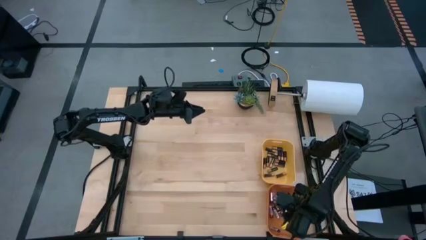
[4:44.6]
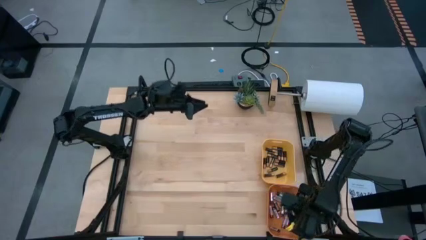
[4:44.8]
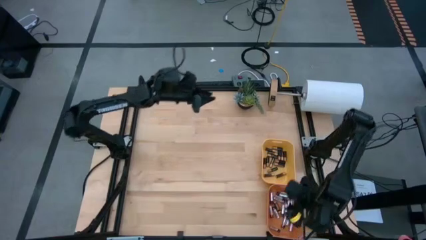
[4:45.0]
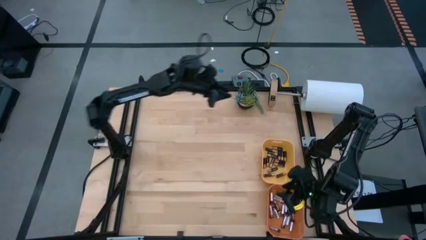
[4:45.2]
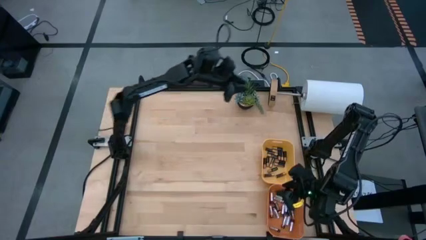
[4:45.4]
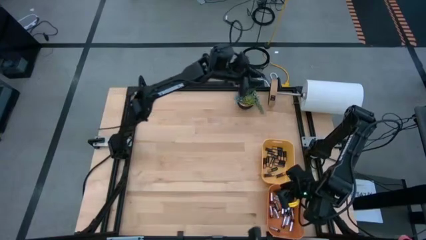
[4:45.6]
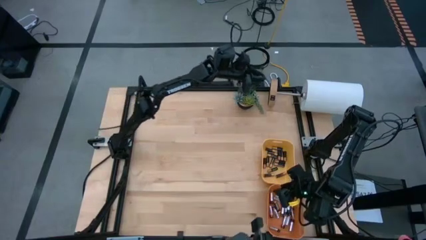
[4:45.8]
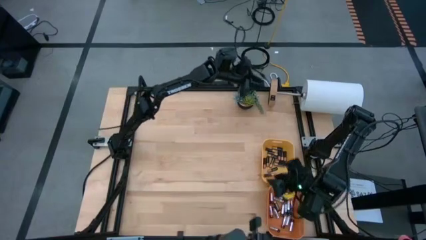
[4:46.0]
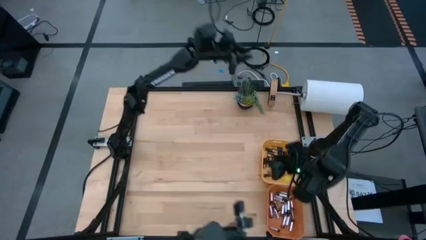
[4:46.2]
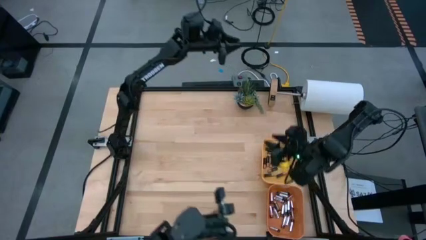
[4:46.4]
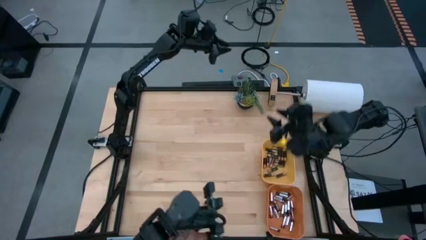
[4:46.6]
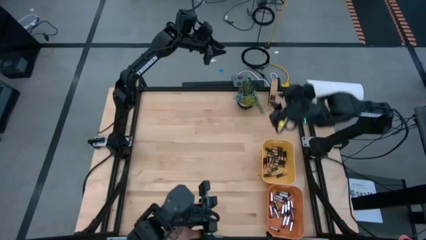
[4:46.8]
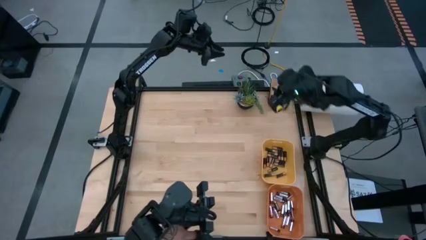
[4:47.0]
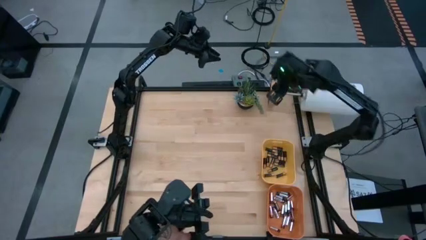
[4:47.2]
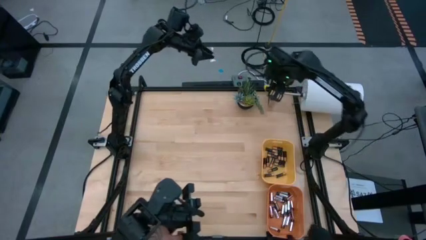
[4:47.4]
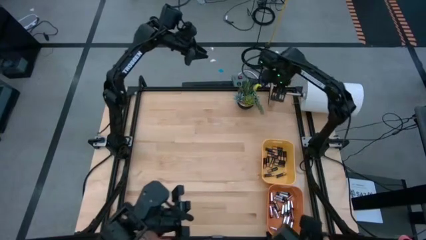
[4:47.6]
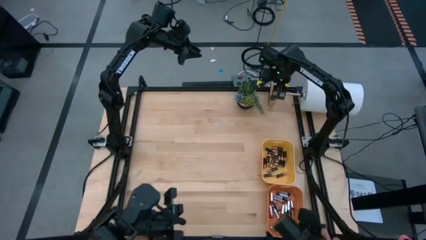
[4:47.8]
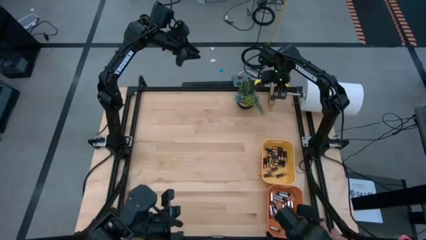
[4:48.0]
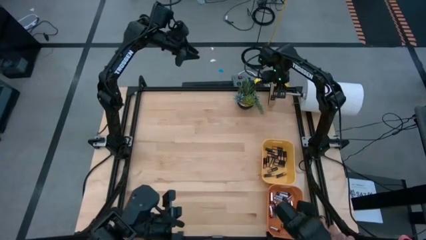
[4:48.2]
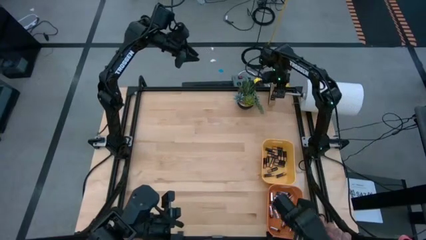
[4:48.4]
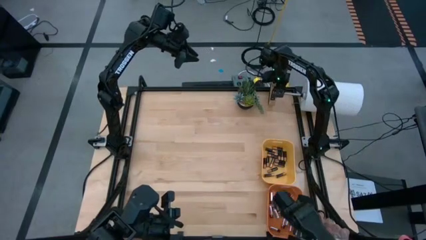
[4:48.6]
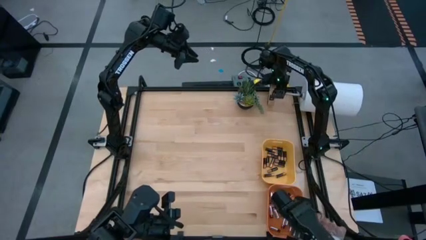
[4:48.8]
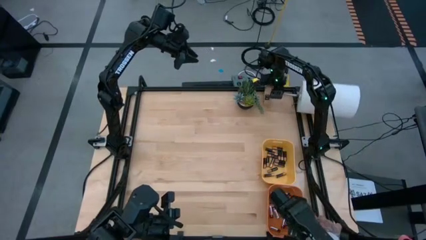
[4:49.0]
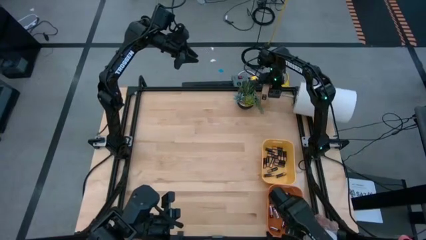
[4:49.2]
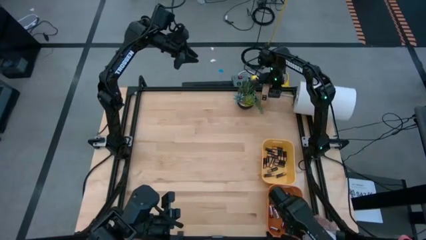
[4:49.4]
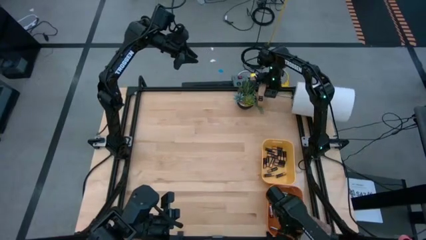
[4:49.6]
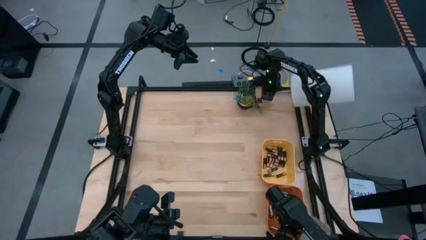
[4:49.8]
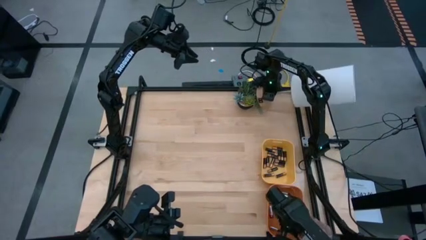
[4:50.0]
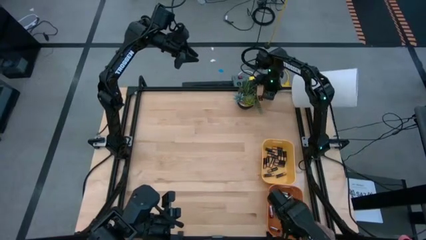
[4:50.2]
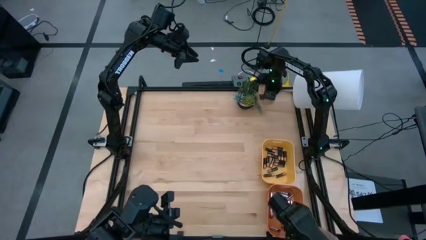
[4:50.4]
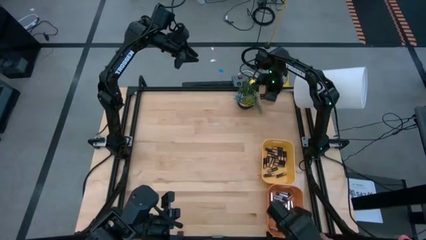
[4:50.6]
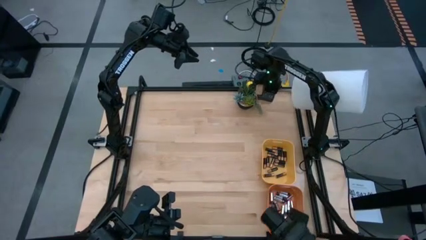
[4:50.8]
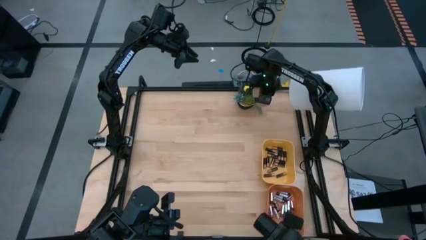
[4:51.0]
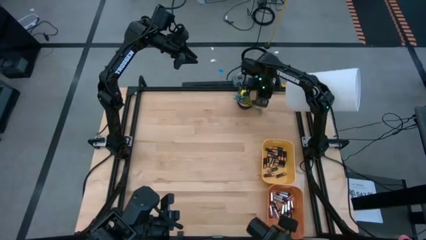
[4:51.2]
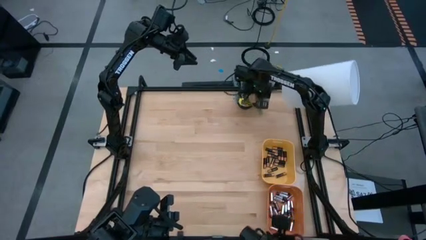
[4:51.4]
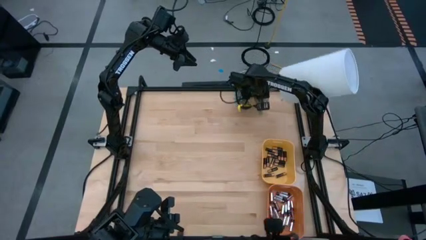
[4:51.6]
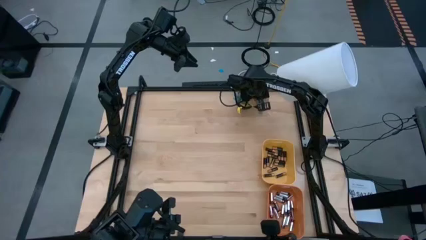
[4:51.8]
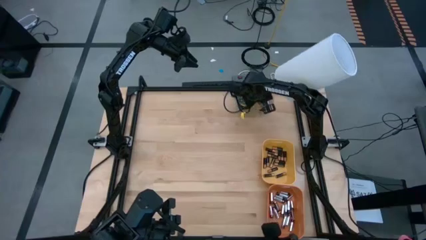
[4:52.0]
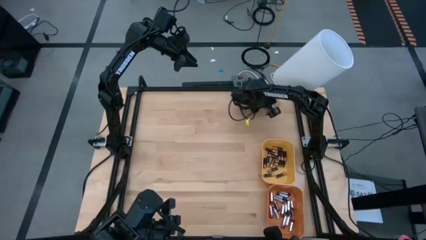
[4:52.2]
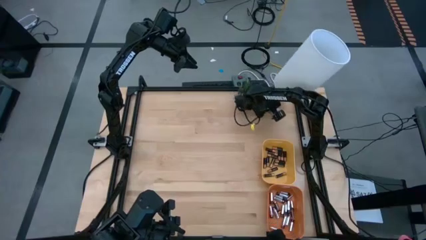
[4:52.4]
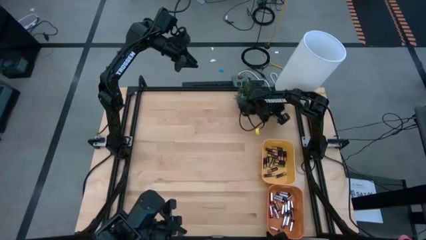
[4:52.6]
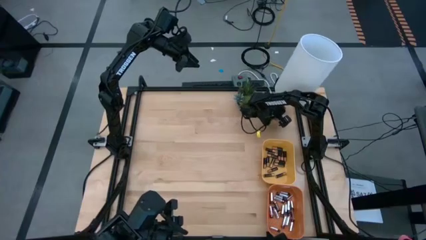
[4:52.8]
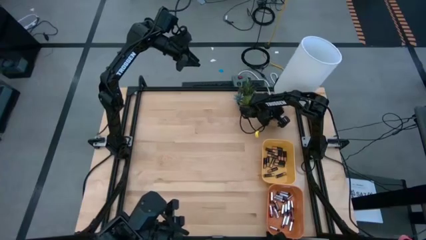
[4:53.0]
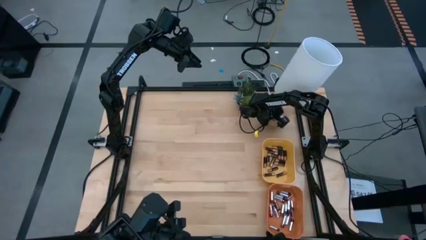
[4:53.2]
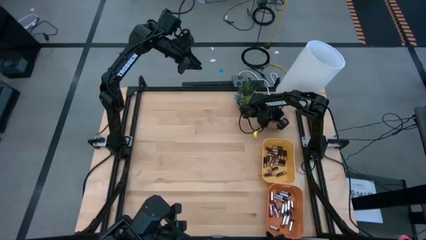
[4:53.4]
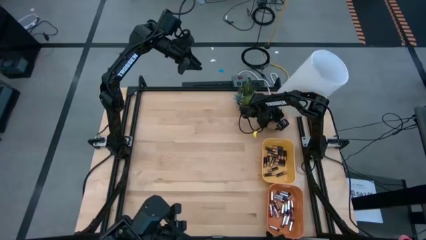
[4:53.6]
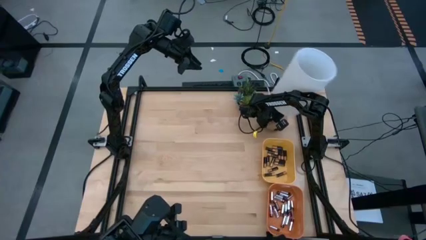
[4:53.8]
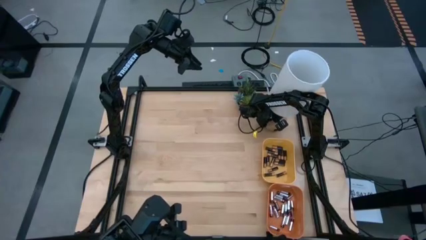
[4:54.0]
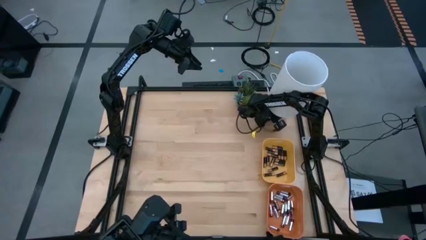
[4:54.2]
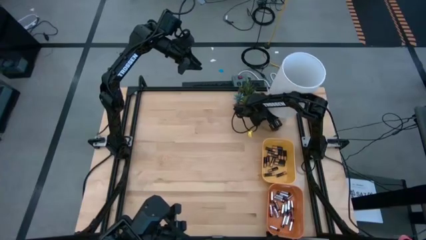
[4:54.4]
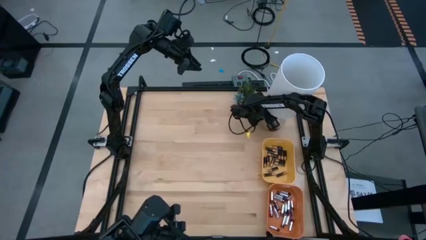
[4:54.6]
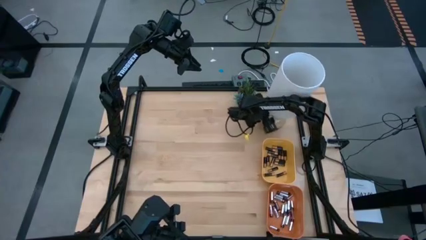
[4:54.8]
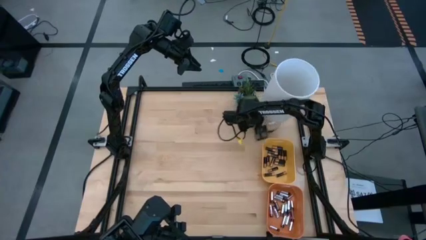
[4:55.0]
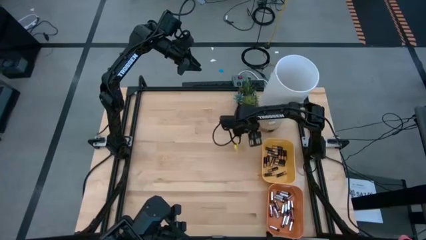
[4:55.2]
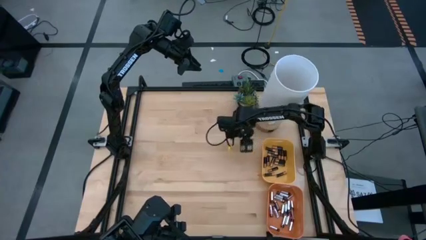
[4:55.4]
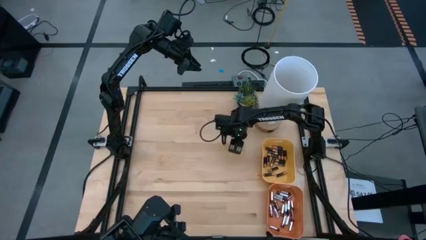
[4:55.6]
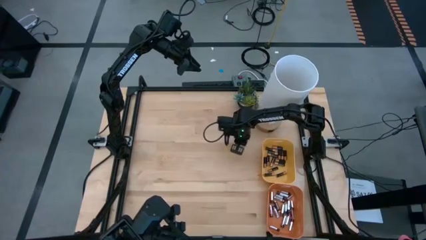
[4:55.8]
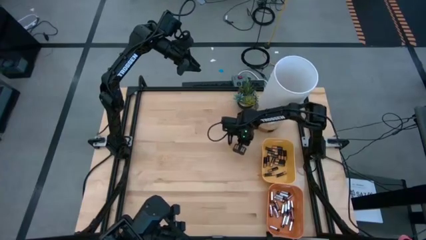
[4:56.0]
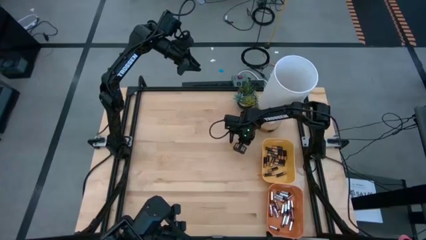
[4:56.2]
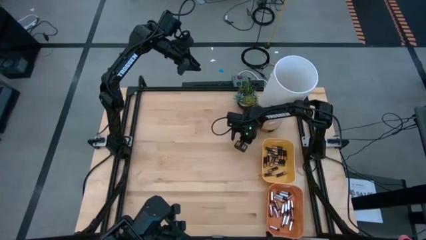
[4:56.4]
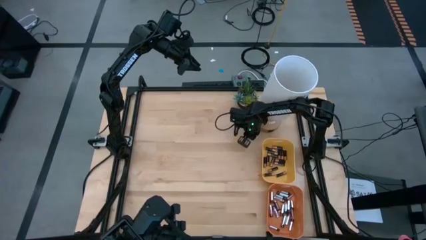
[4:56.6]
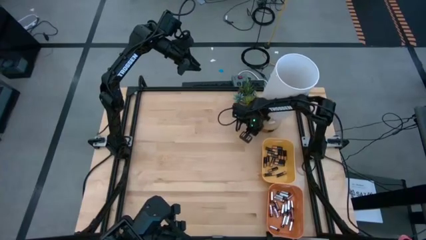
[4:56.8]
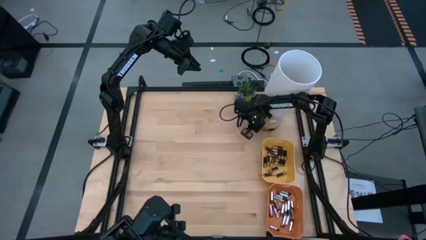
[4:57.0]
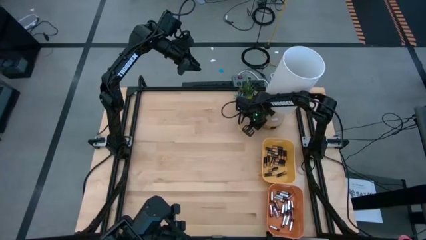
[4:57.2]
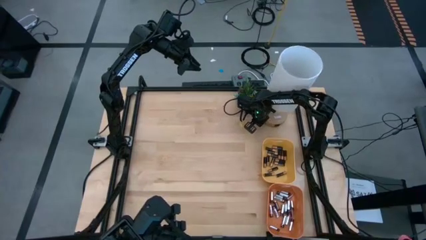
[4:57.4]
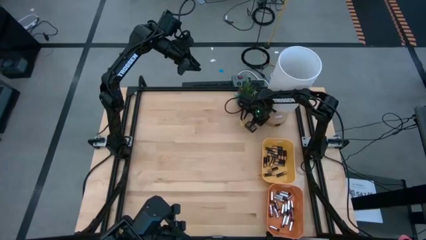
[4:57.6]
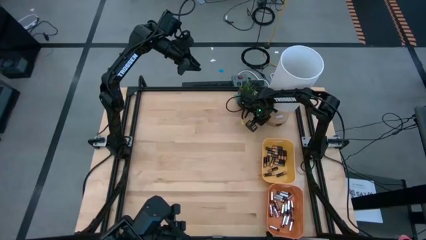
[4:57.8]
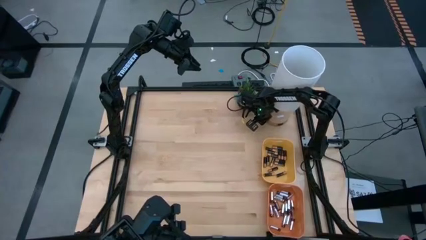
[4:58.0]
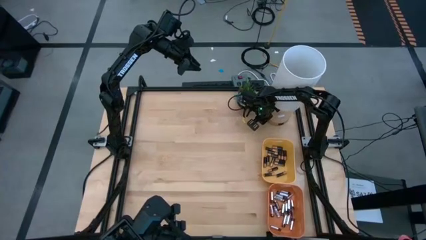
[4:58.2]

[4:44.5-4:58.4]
Task: Sort batteries
Adjust the white lamp
